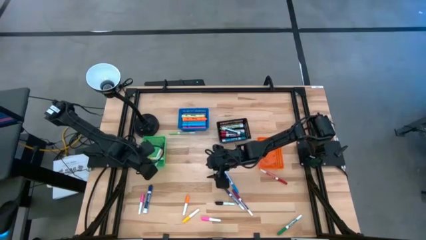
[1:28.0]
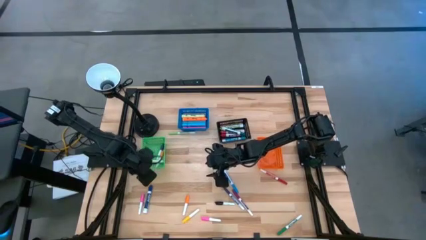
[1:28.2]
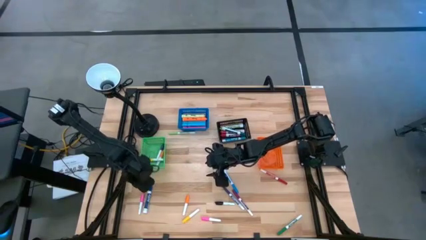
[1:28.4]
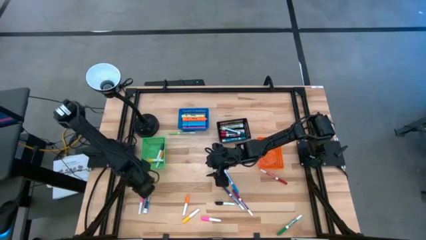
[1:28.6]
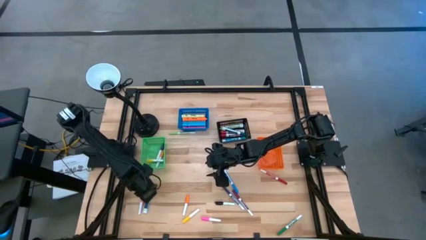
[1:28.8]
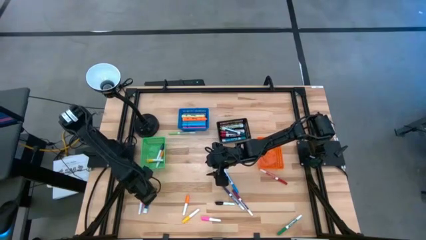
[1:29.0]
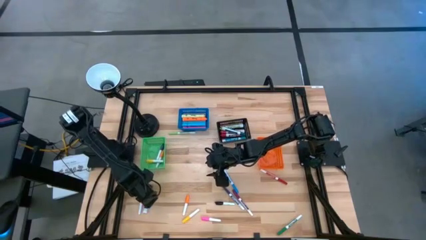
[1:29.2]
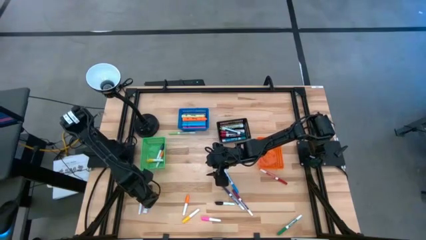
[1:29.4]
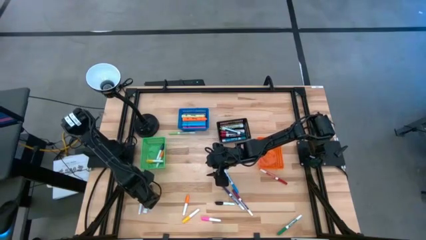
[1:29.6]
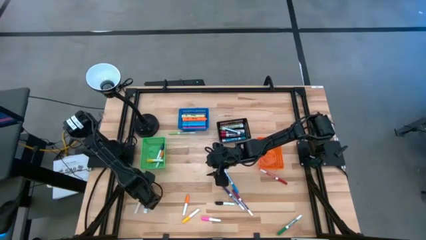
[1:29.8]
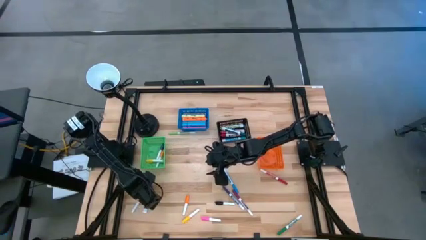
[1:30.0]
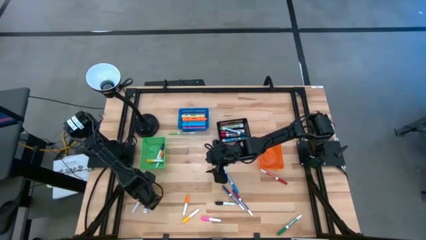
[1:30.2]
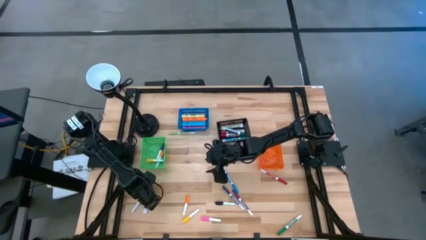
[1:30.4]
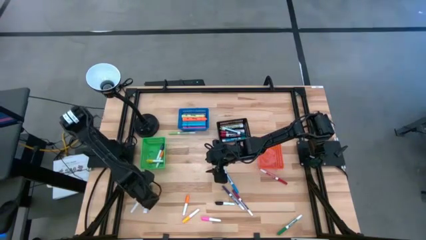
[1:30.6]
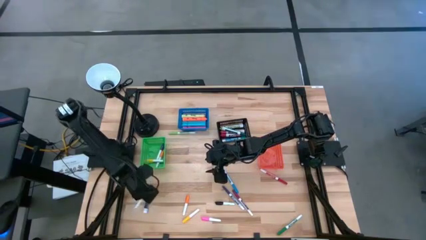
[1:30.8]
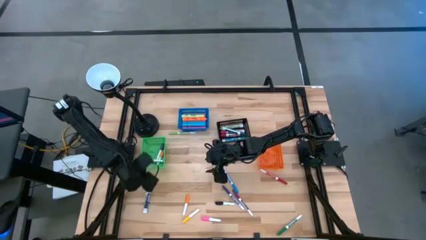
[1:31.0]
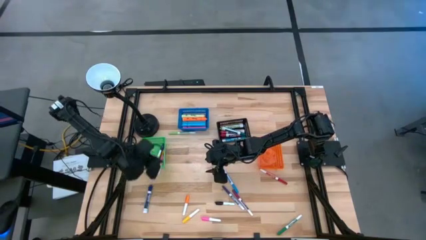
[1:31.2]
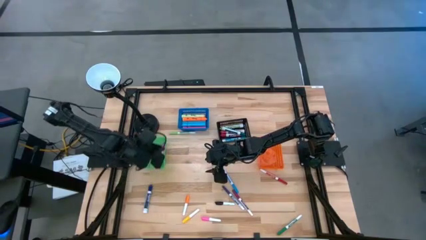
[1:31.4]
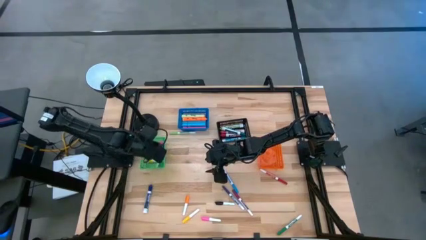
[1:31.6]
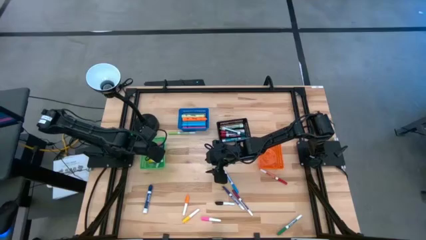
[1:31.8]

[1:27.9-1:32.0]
Task: Pick & Place Markers
Put the left pink highlighter pen into the green basket

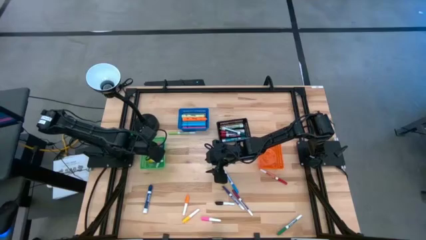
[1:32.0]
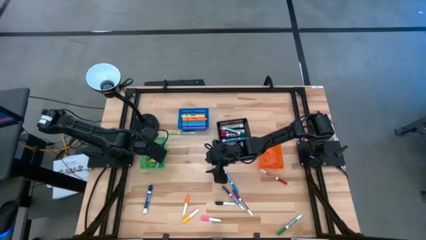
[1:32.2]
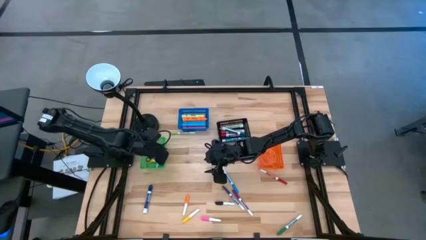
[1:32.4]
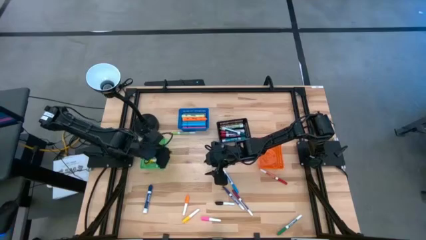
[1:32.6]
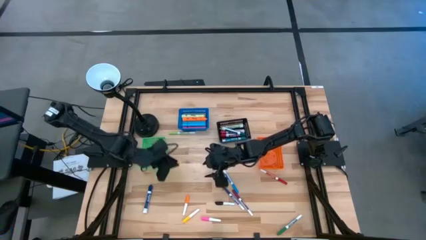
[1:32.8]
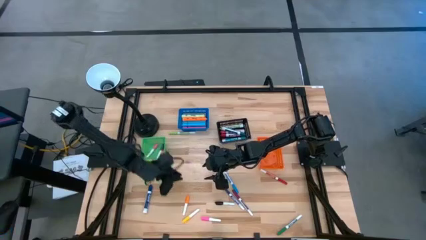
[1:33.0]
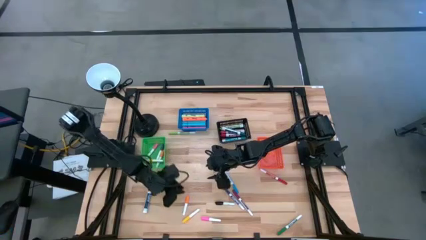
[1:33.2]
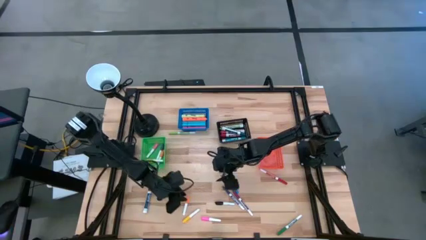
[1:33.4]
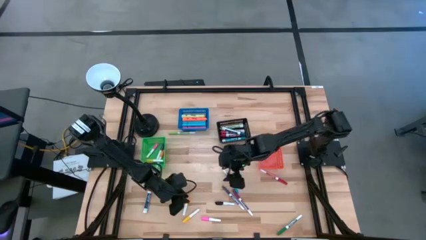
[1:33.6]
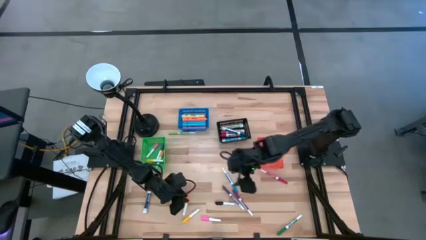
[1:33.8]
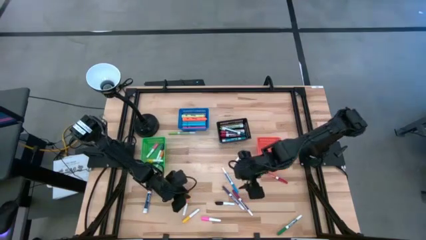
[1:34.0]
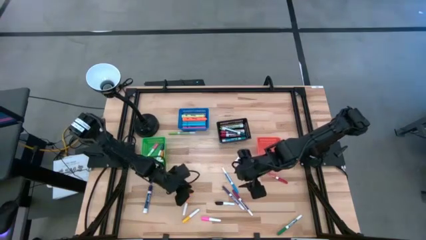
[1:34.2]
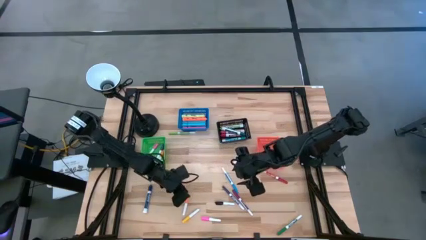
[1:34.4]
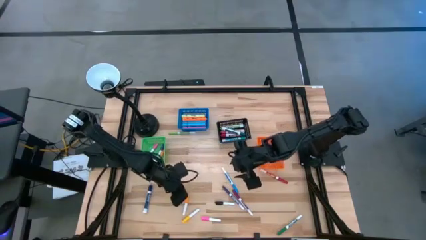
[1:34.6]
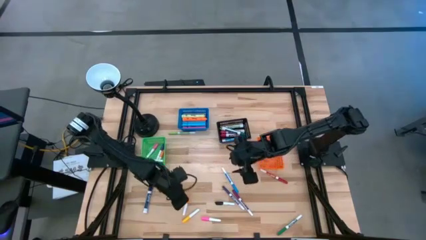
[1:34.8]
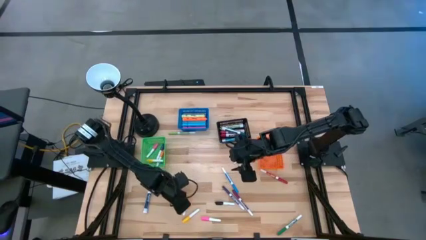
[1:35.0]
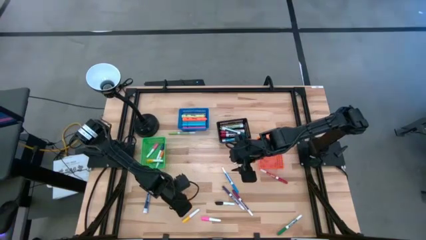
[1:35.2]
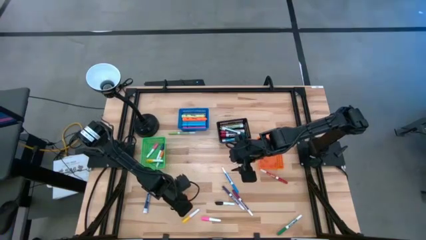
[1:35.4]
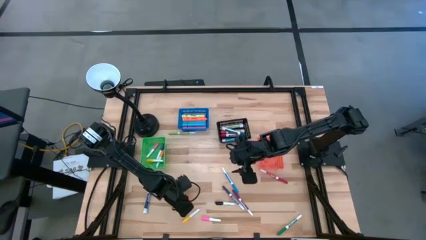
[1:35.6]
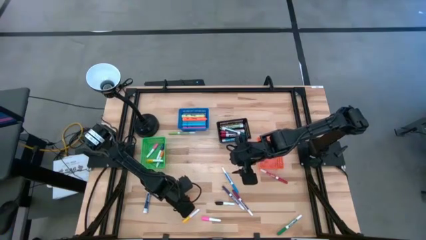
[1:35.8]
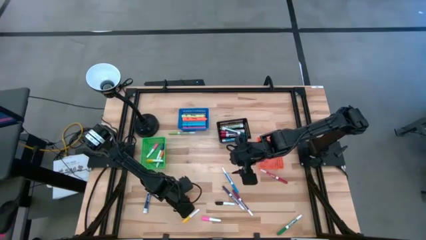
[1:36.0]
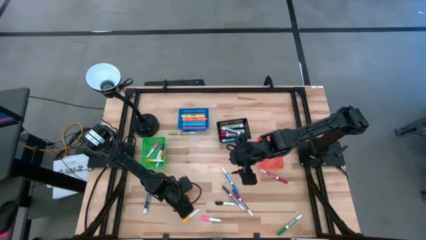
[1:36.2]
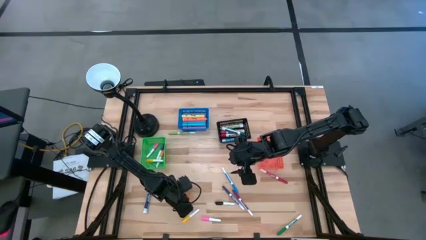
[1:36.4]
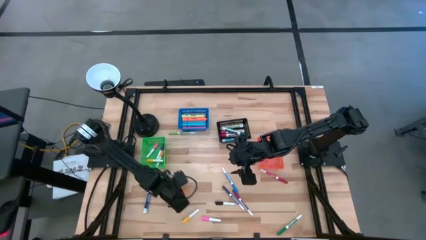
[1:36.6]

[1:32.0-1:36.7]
Put the orange highlighter pen into the green basket

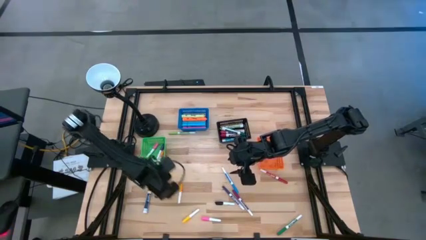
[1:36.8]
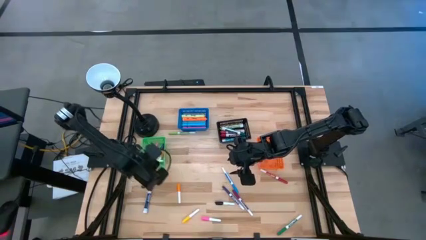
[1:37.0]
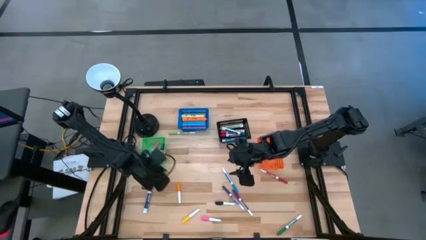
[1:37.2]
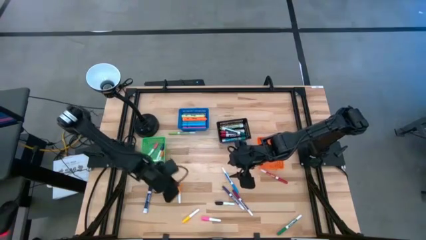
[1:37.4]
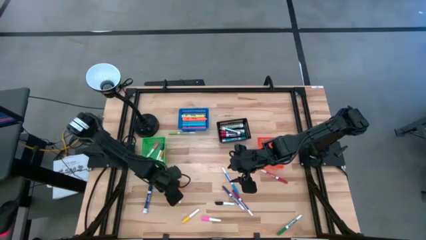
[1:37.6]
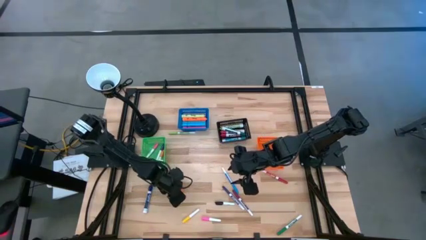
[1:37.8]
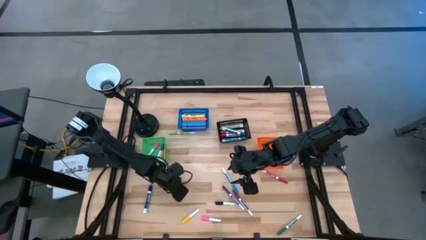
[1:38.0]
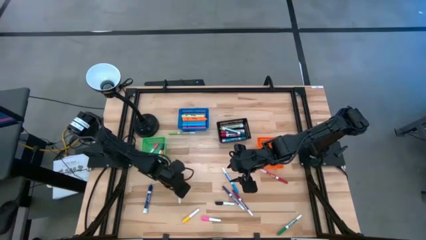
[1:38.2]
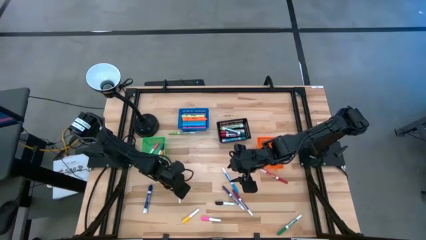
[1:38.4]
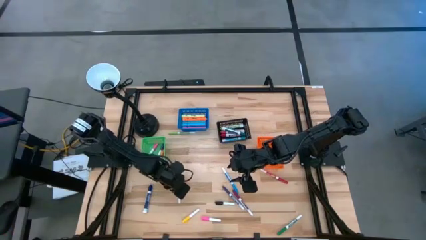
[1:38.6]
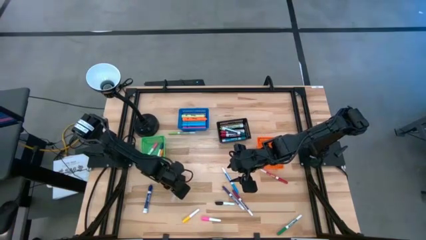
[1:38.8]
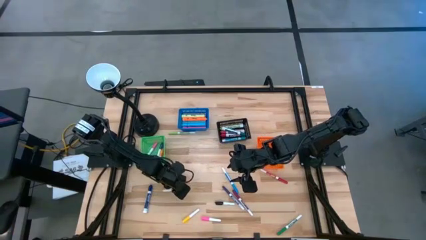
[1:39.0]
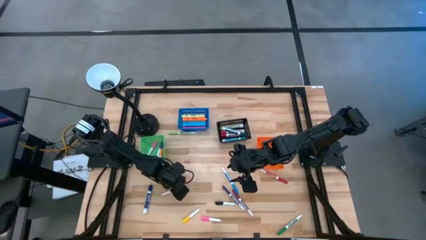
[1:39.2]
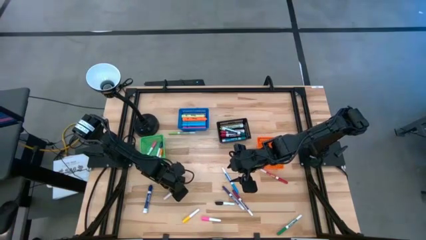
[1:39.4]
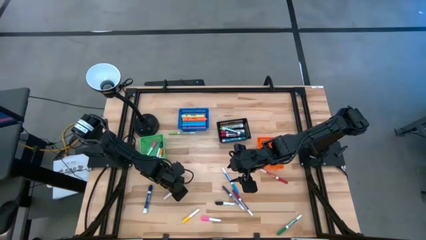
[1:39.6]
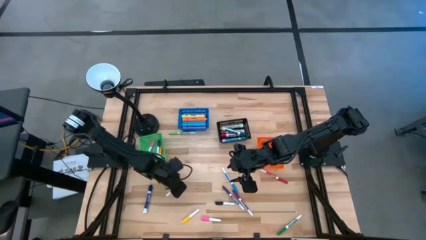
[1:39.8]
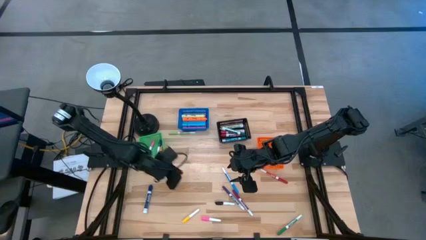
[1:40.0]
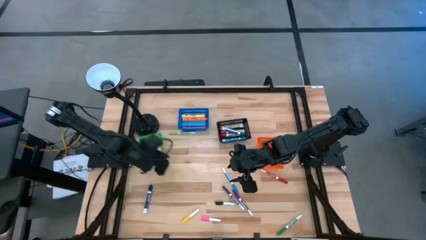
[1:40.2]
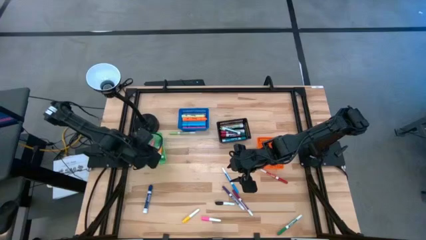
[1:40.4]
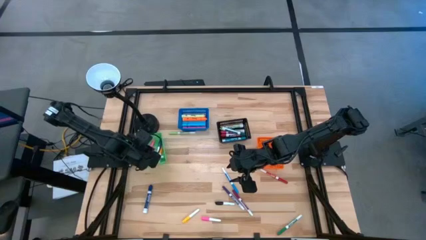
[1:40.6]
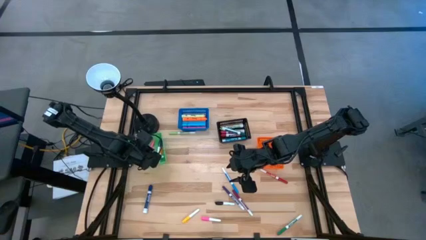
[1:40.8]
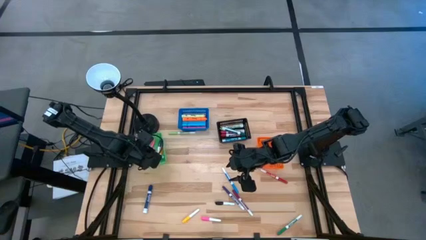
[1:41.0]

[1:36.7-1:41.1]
Put the orange highlighter pen into the green basket

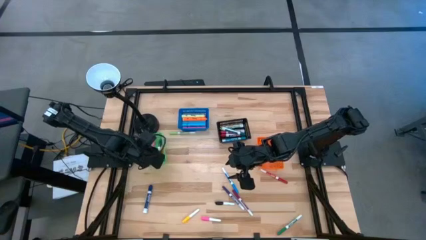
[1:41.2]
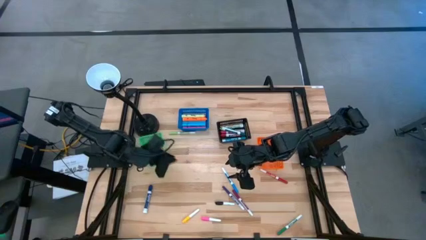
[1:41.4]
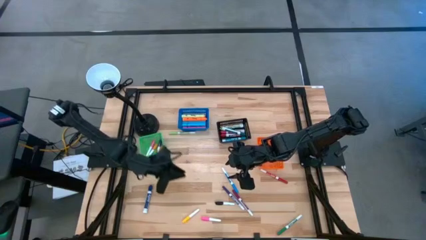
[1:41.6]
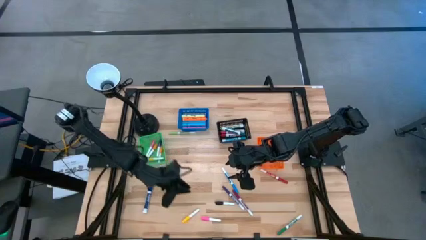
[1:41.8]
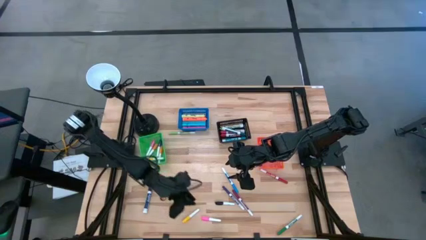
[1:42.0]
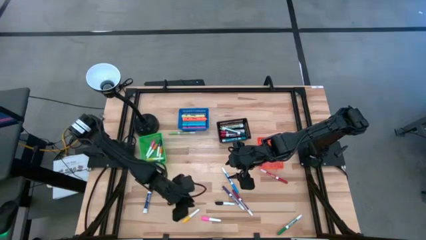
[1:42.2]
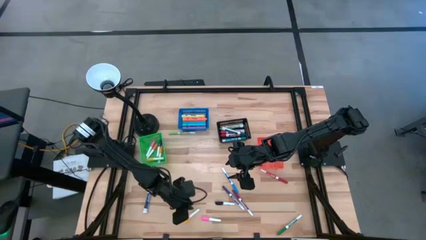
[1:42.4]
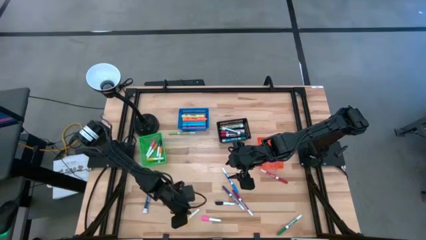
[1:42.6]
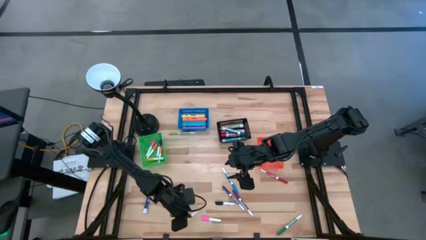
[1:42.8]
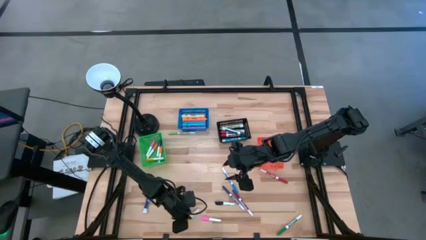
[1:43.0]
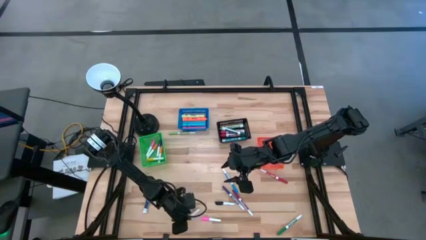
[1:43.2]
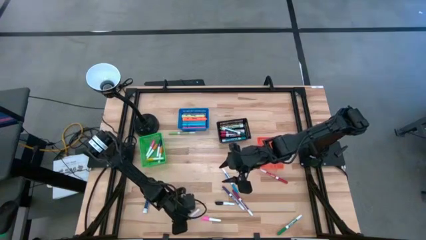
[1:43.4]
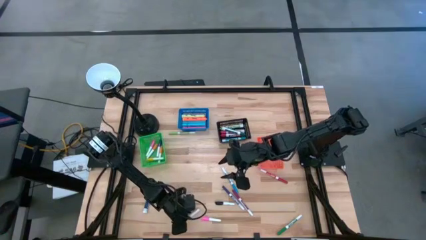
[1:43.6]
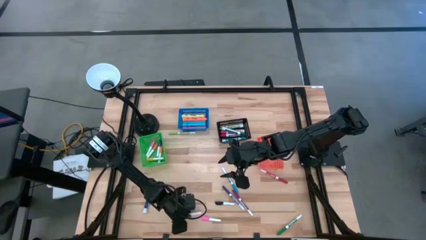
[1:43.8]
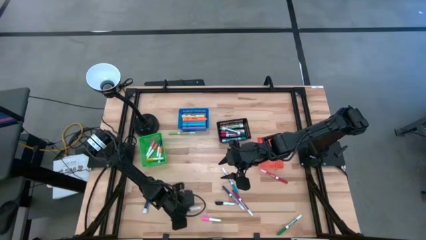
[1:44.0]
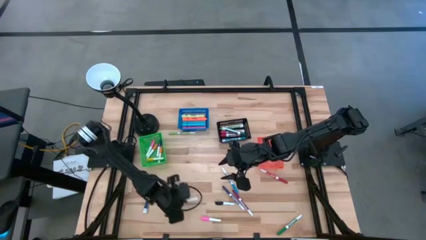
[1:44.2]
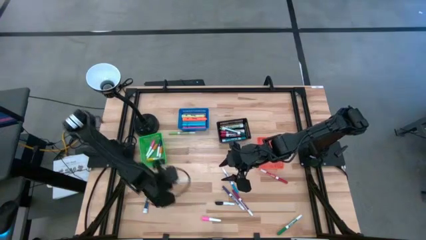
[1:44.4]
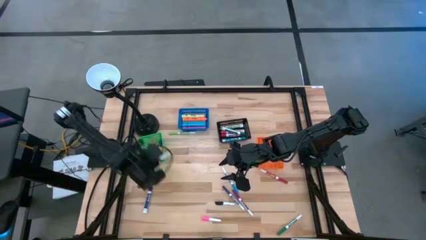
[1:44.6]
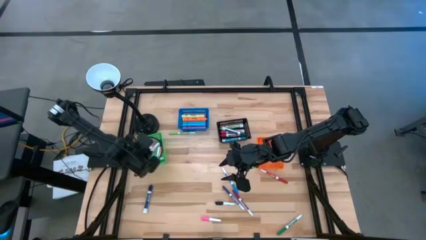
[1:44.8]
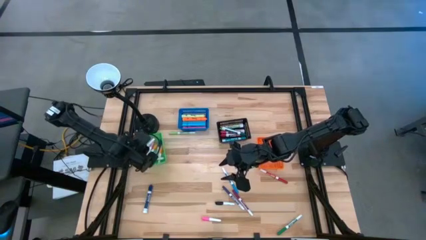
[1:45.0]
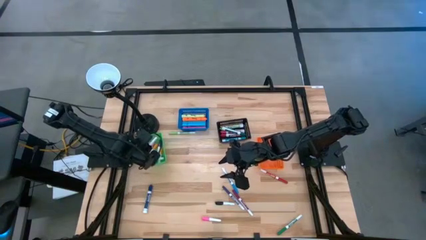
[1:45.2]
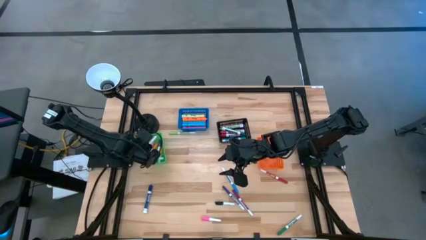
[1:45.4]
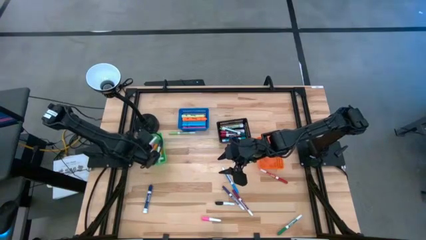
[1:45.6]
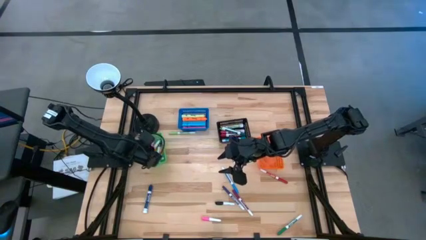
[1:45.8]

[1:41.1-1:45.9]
Put the yellow highlighter pen into the green basket
